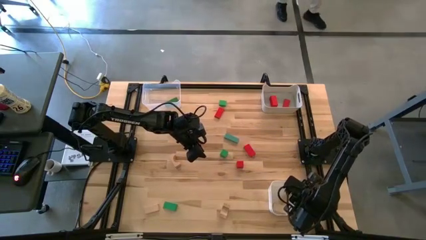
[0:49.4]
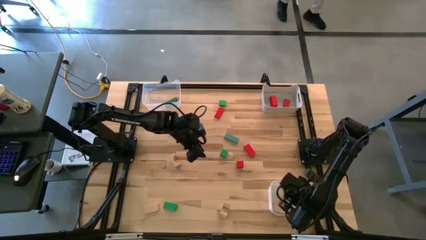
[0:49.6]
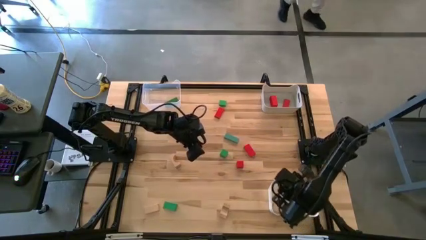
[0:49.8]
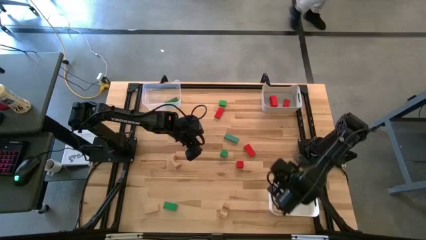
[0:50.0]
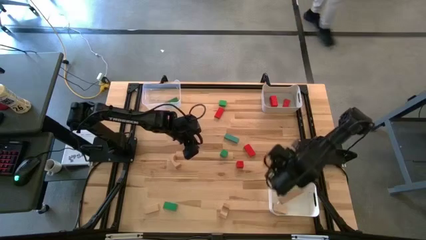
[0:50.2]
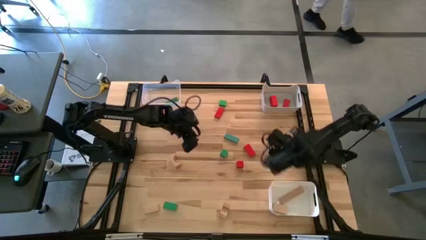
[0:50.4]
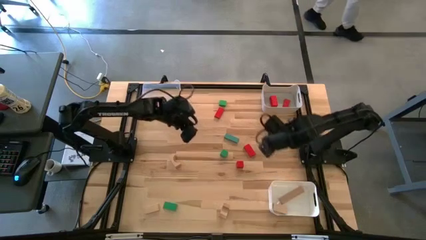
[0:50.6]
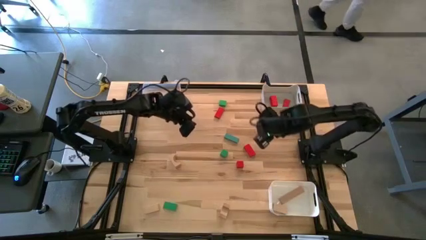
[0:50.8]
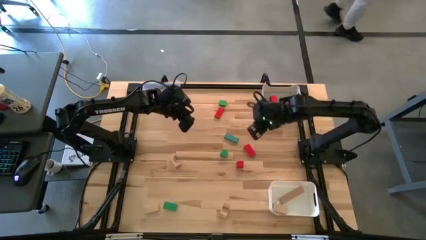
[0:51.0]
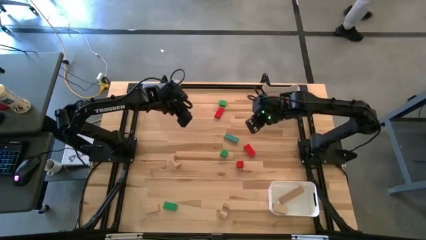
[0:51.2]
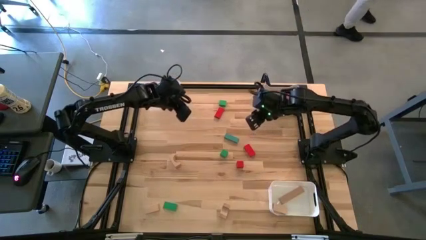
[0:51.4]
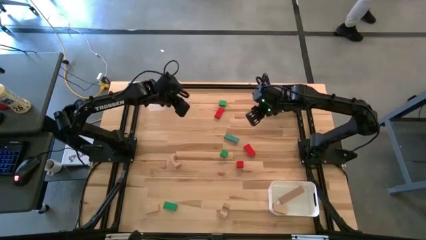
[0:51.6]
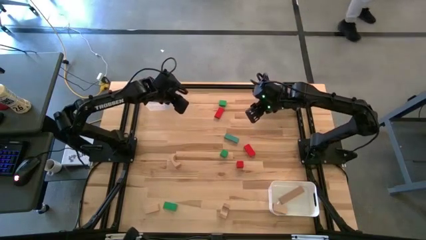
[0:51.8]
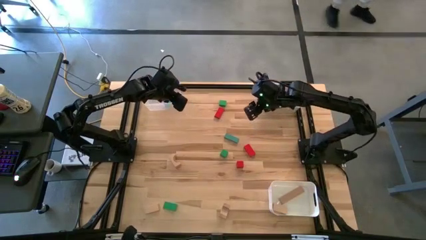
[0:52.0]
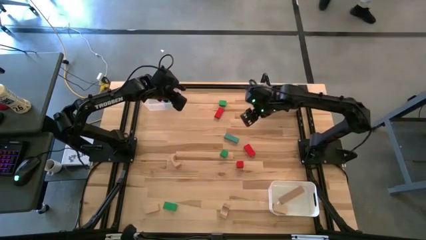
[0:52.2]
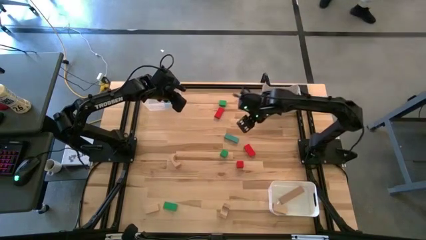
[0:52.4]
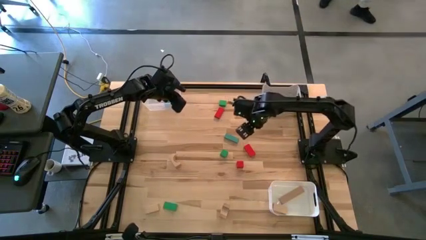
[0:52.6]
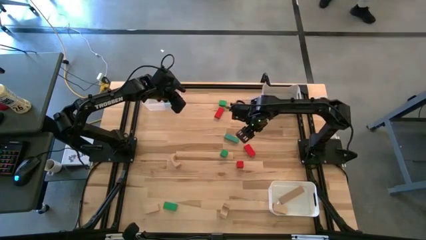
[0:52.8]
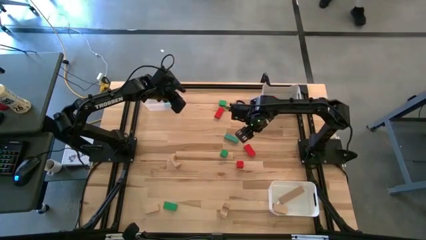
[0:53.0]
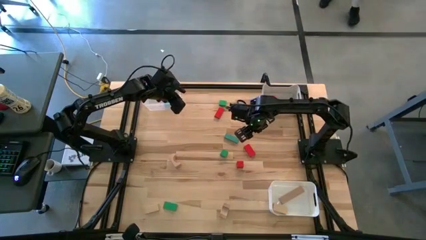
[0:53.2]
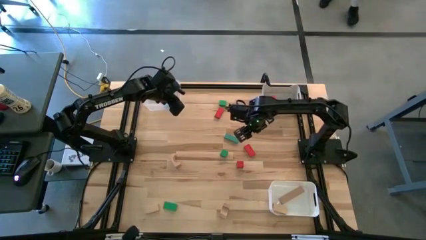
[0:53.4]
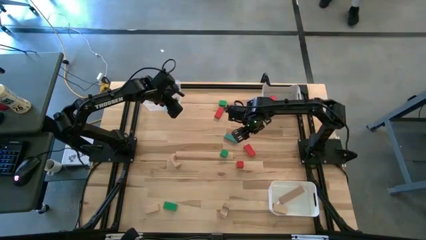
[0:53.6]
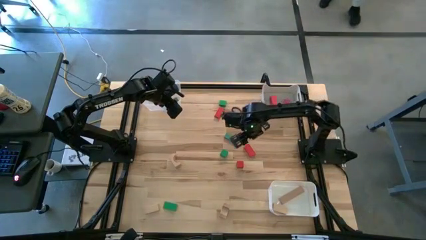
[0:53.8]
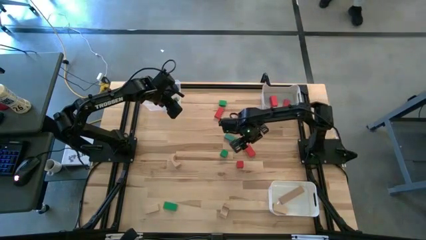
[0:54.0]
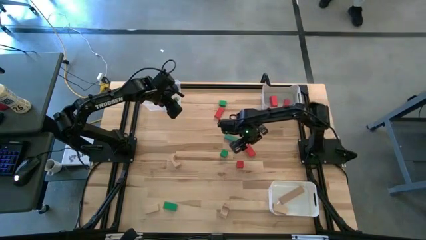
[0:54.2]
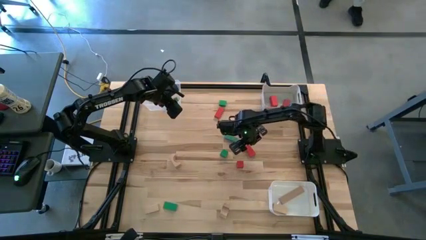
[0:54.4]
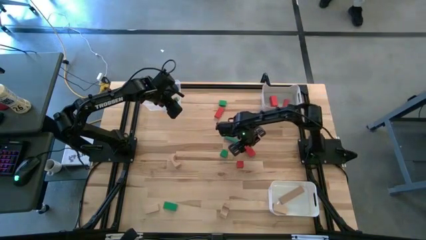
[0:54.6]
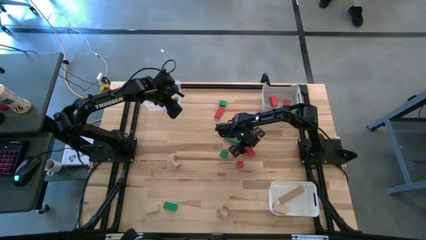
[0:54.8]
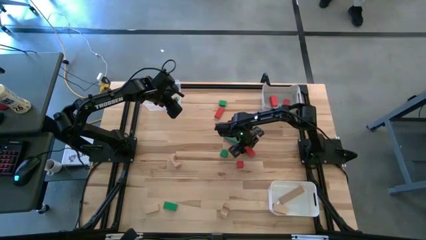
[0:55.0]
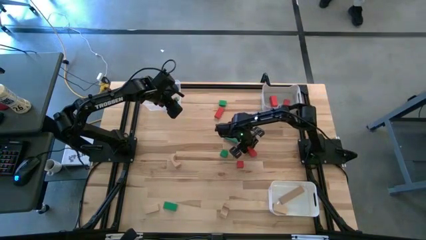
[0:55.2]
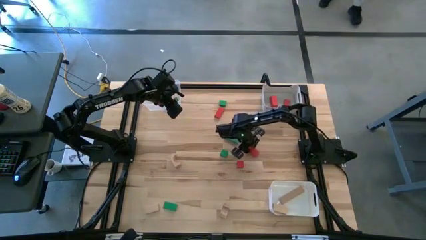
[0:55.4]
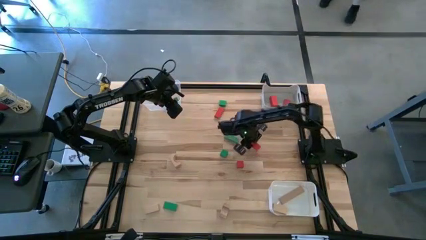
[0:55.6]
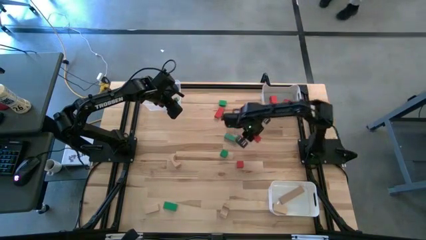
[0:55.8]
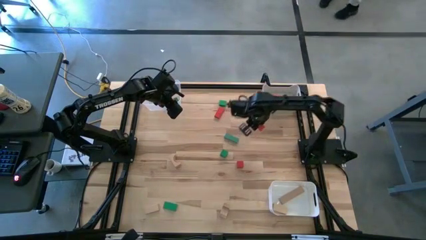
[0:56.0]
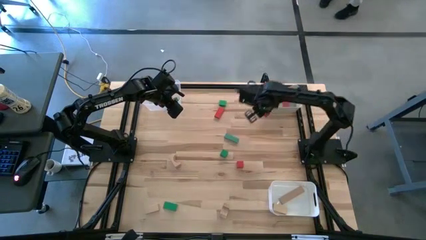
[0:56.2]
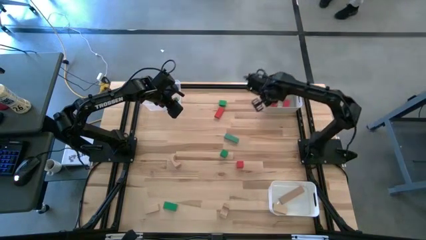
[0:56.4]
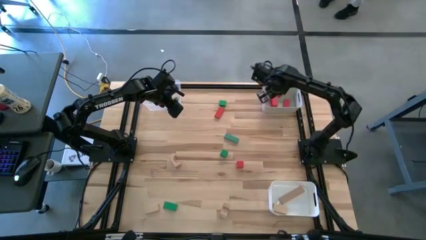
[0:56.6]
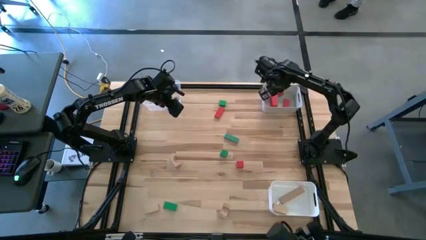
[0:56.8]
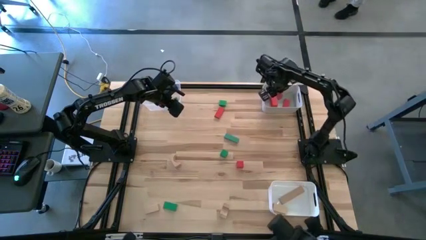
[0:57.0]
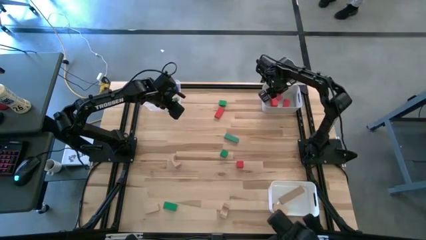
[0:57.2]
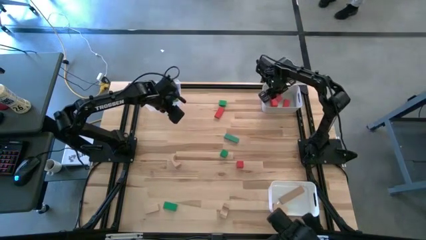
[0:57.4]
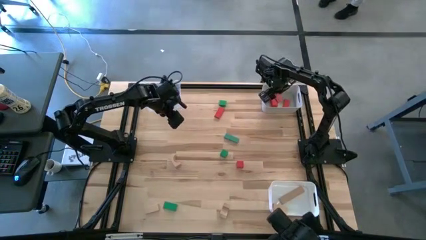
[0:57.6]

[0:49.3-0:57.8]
Task: Sort & place blocks by color
Put the red block into the gray bin

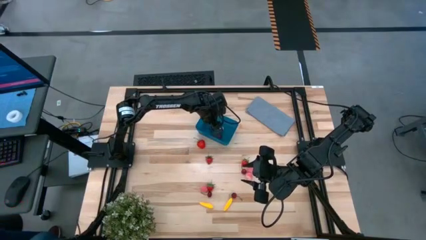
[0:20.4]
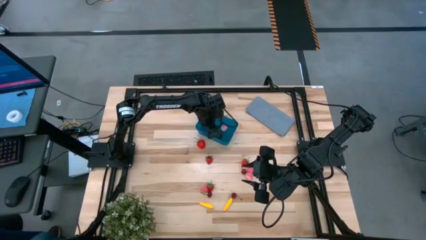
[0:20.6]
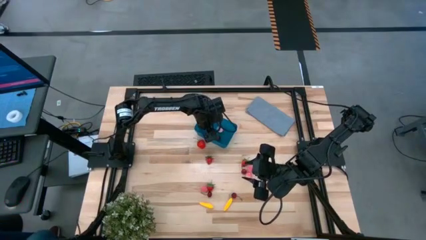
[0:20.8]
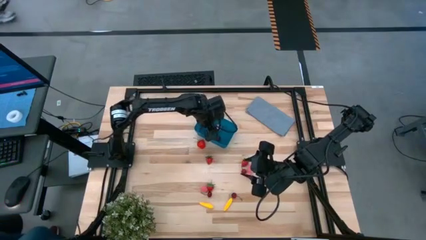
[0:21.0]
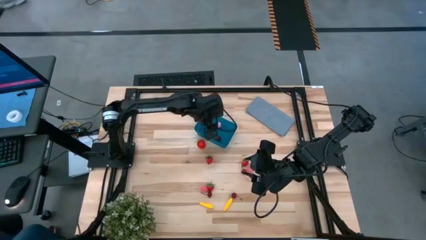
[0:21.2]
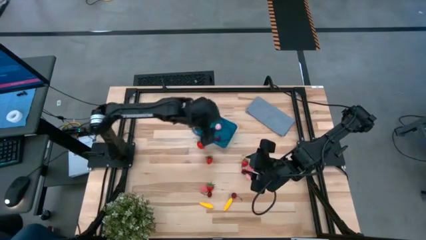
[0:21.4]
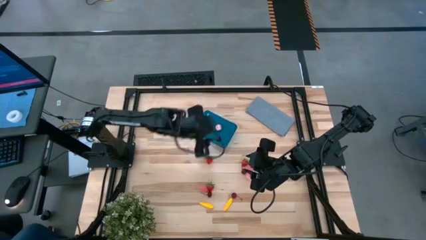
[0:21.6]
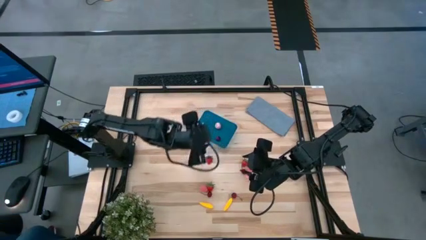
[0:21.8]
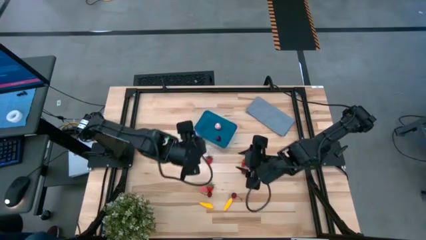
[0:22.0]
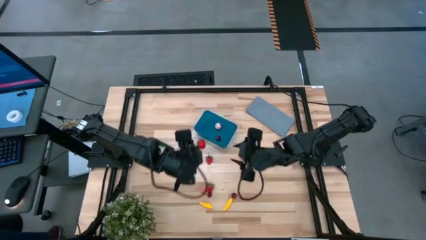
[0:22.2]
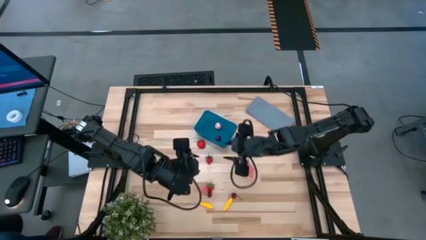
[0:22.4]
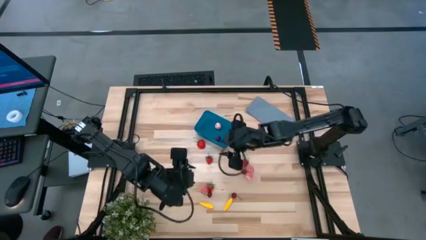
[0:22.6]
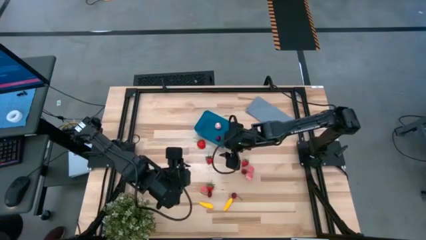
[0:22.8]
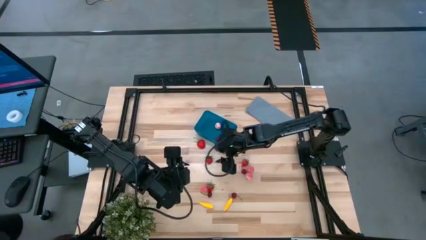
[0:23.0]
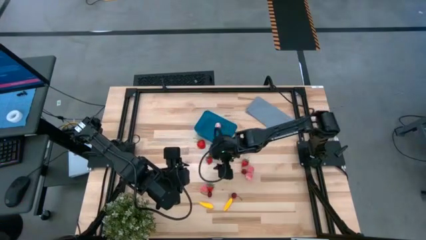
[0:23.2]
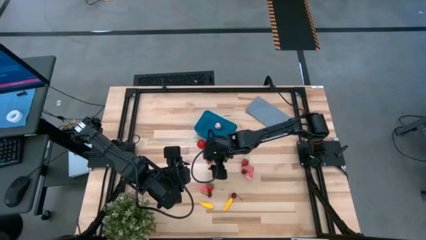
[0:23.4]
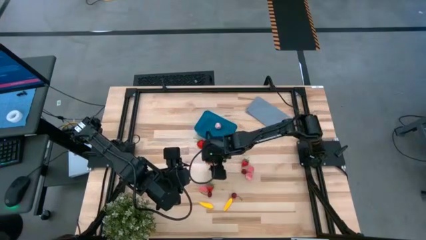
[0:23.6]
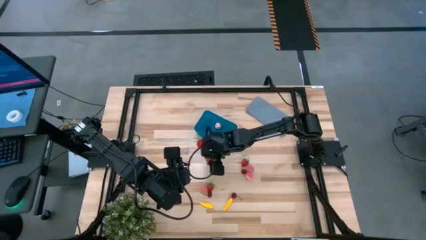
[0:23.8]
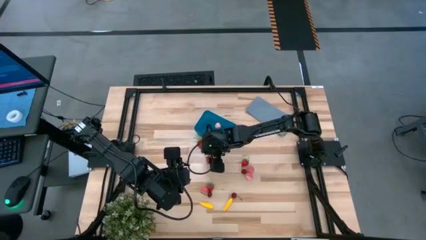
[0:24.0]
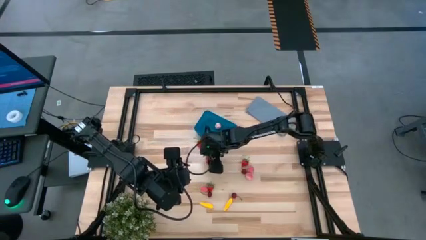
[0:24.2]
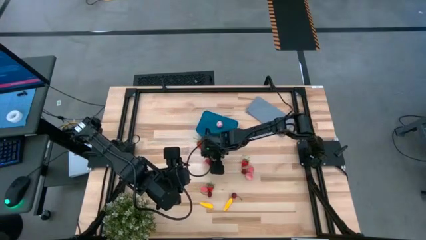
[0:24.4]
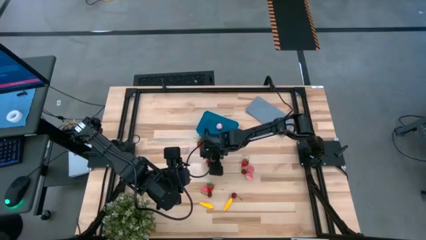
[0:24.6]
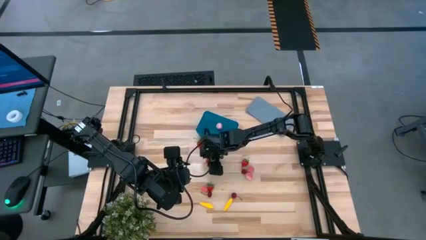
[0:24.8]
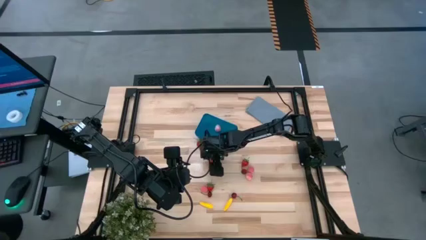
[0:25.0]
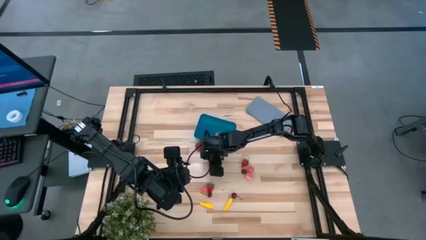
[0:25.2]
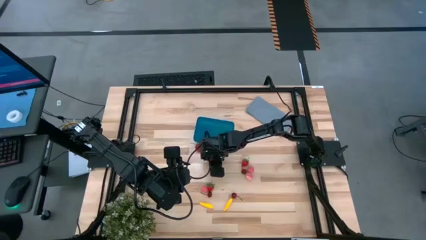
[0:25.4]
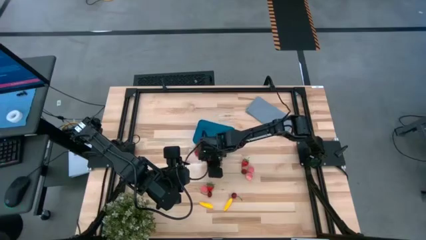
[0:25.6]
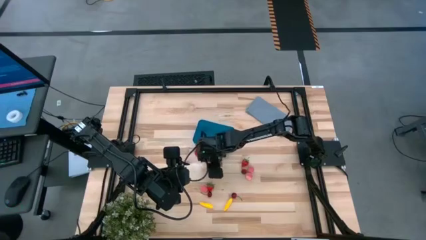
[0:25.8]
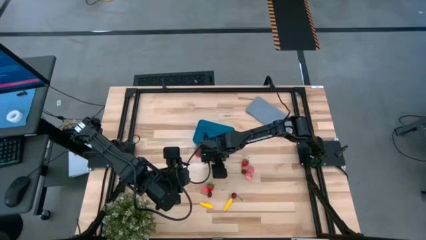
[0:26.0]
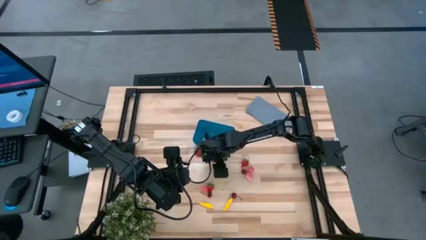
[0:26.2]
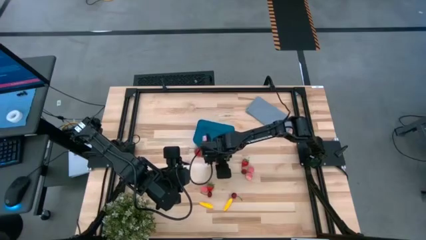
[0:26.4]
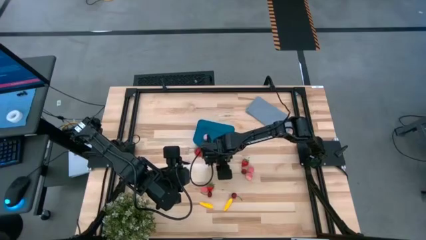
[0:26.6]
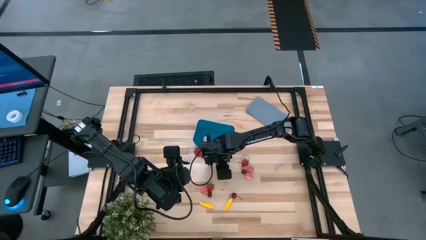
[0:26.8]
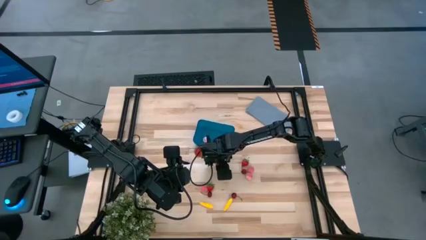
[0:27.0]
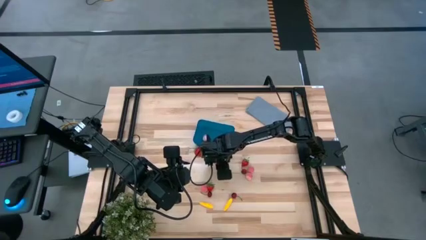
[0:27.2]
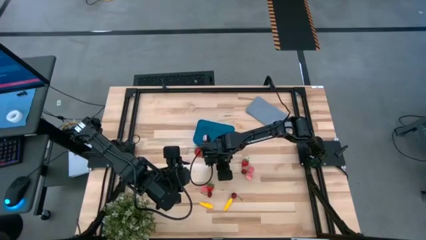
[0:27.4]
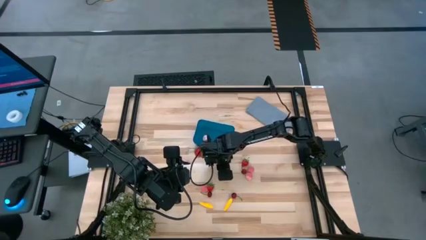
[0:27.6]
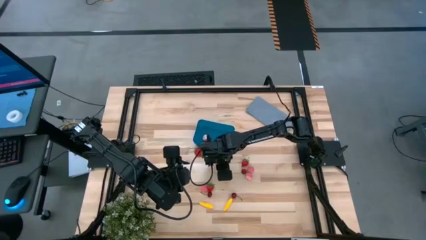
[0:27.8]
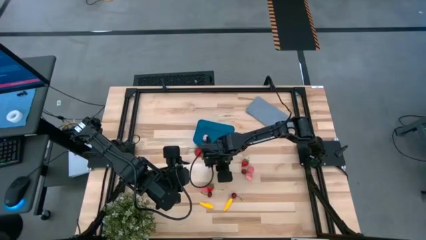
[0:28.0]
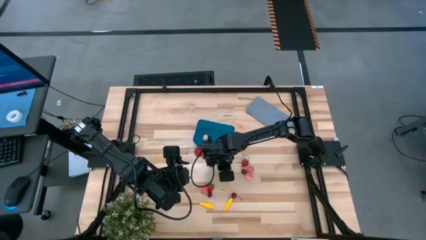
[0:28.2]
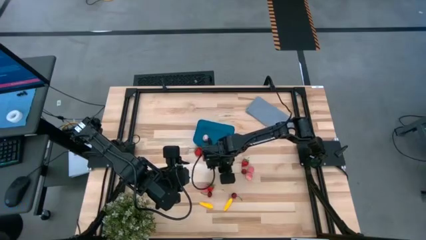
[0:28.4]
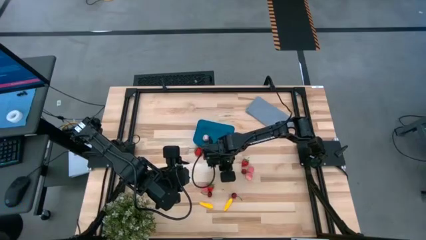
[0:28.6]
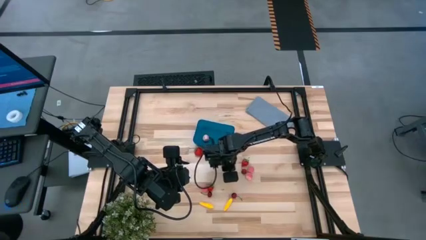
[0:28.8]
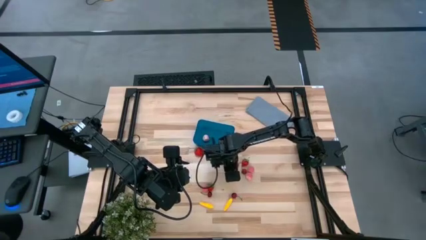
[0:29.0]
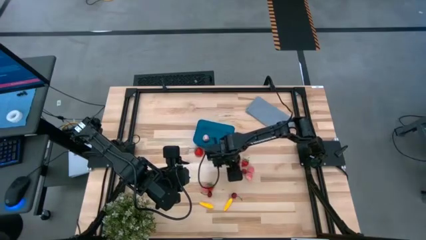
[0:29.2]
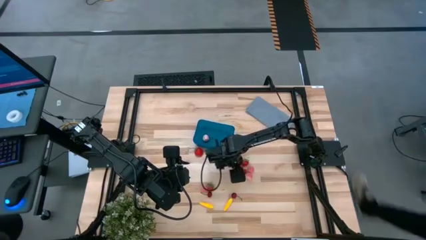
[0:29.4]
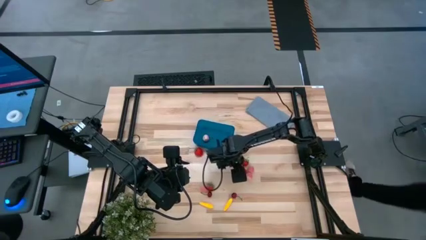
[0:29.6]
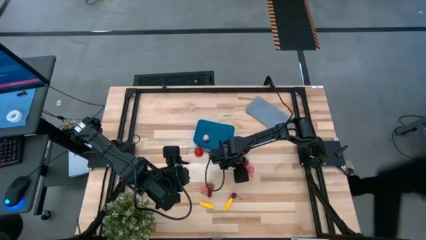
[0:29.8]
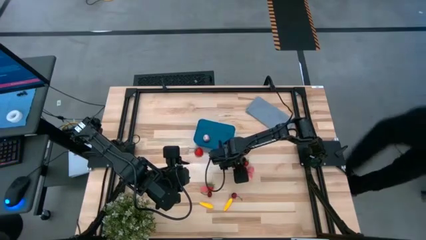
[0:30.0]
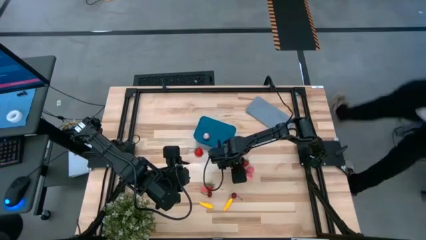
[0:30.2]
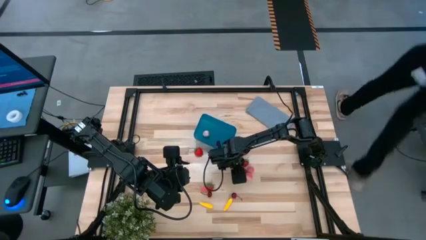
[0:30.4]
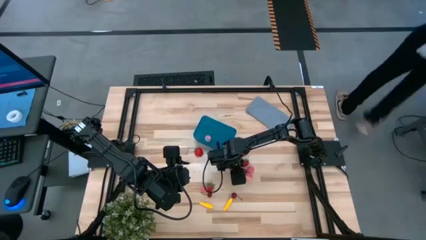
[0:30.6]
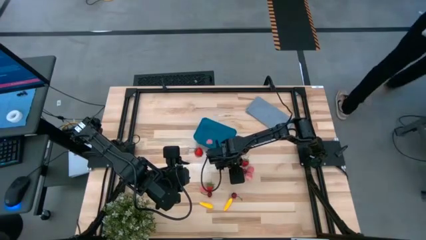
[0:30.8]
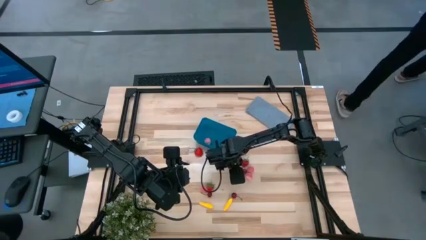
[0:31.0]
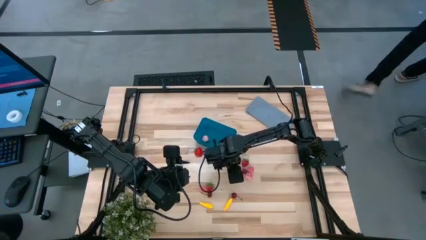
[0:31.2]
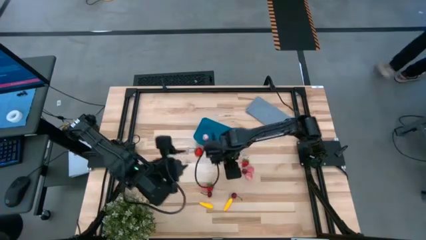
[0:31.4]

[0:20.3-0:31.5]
Task: Pick and placing Produce into tupperware
Put the red strawberry into the blue bin
